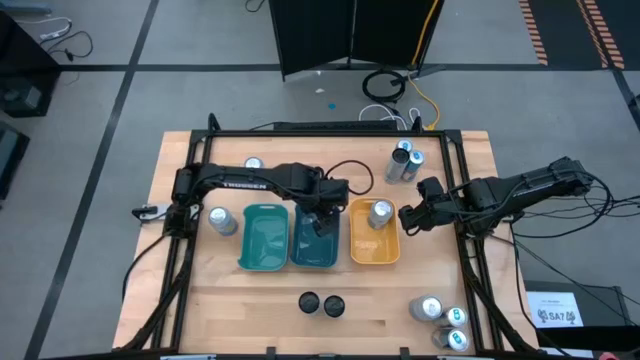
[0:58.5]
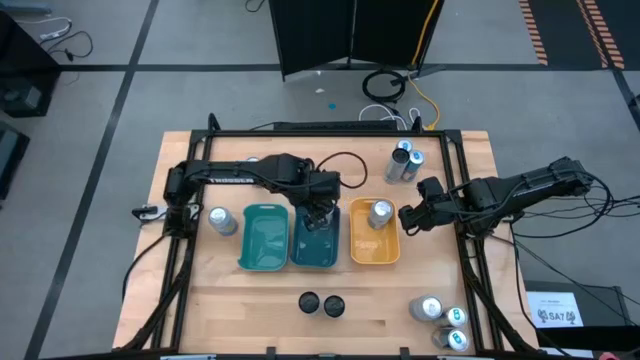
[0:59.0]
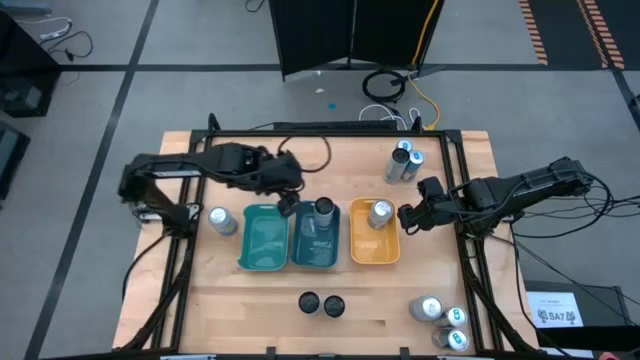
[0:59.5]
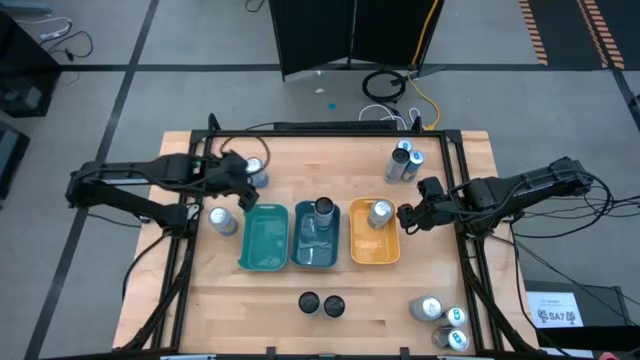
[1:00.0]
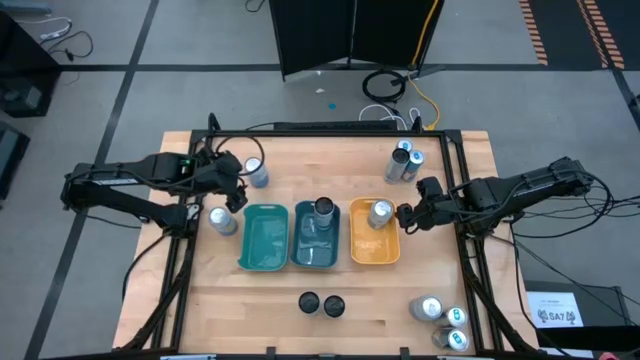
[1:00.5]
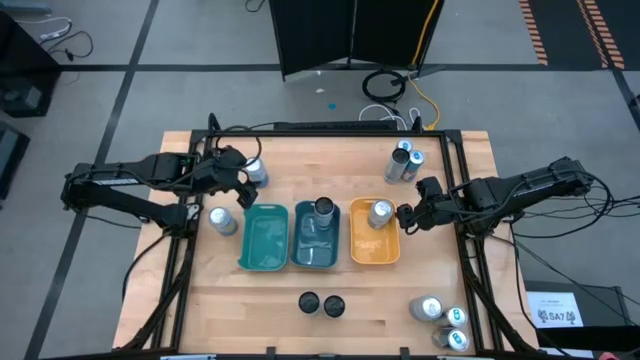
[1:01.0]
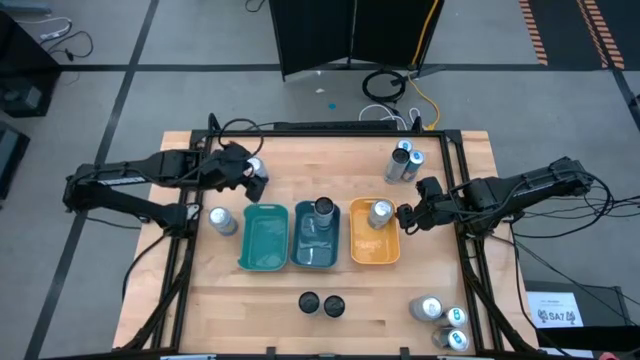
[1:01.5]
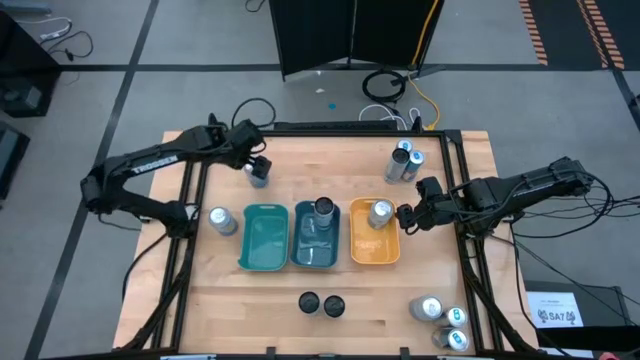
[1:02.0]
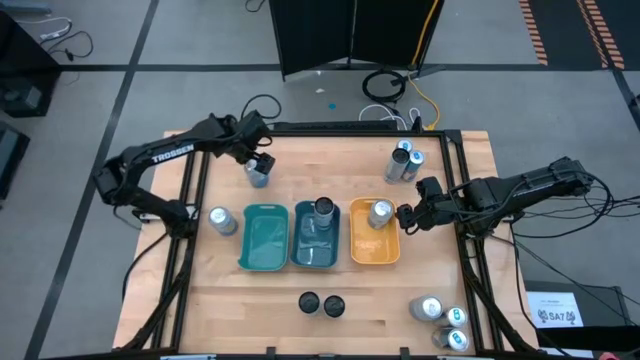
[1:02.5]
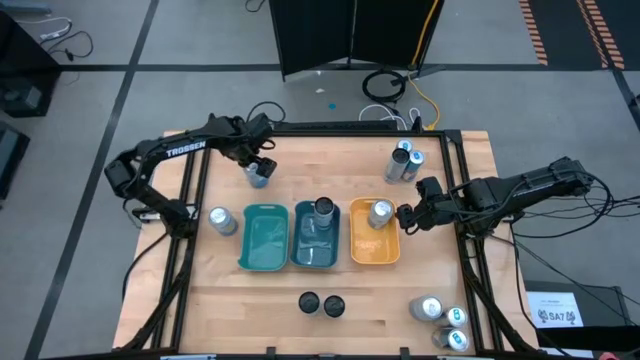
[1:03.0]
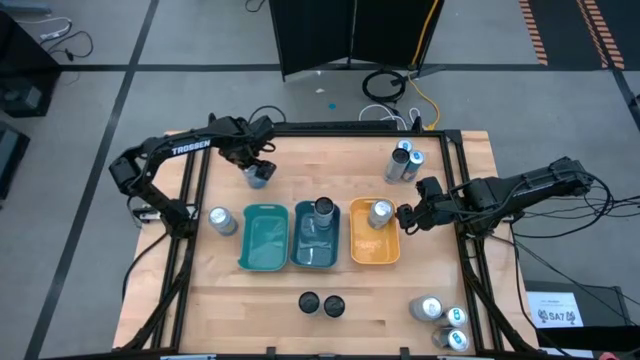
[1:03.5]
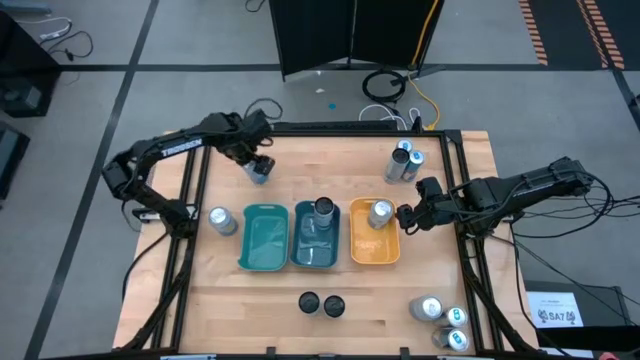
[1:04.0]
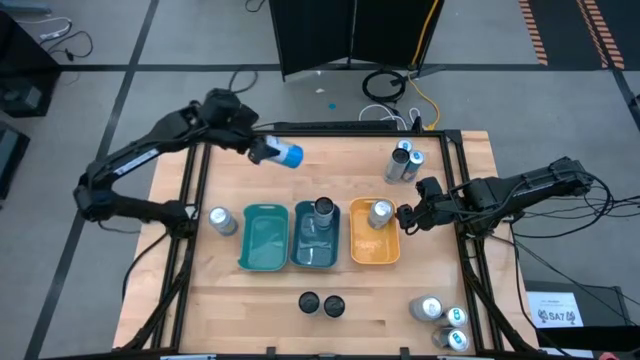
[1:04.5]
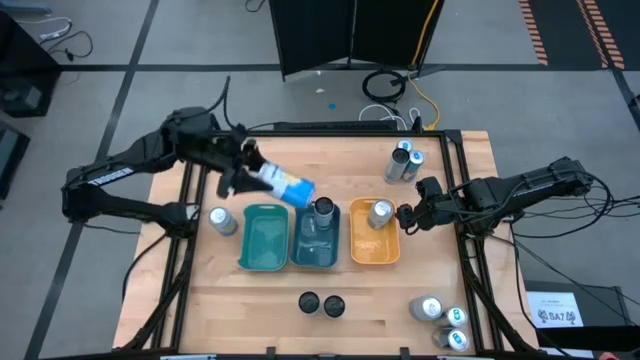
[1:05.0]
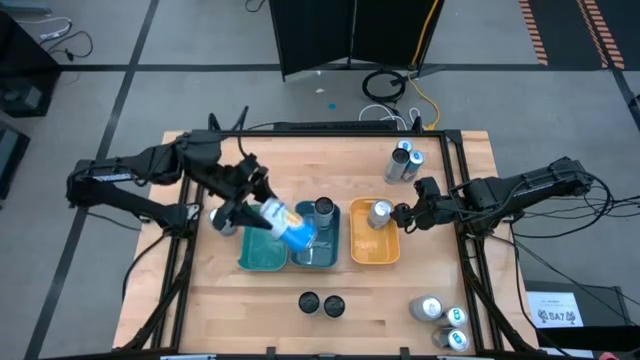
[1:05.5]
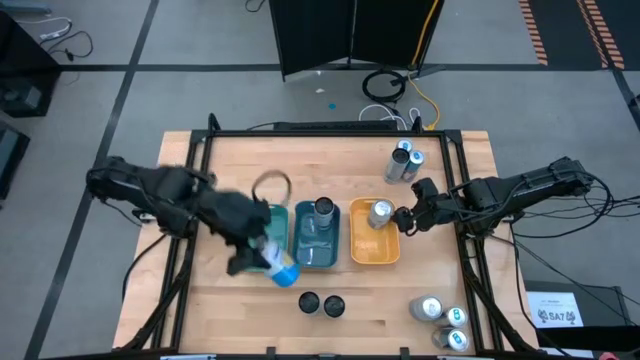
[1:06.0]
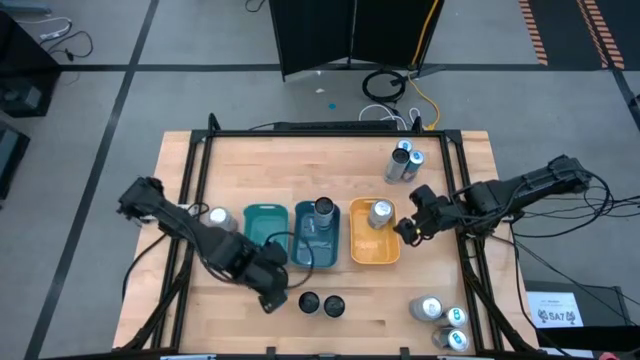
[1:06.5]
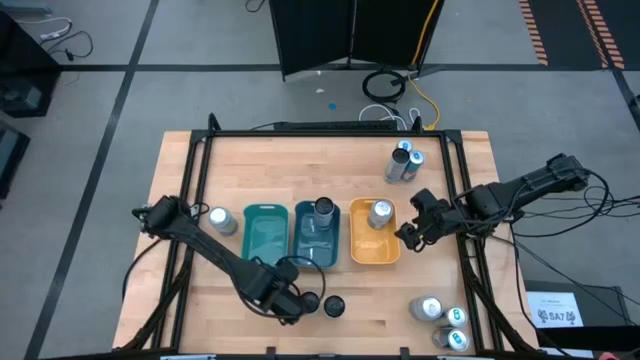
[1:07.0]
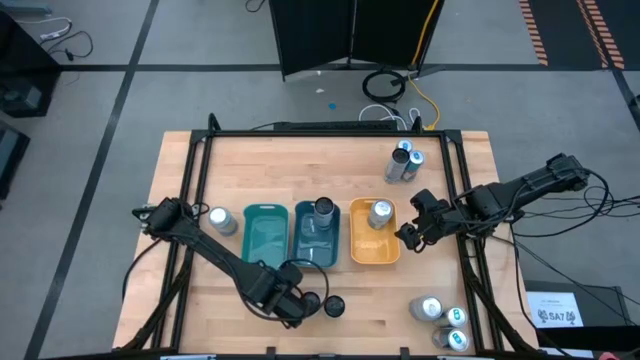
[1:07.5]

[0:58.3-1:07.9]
Task: Sort soda cans
Move the top silver soda can to the bottom center of the table

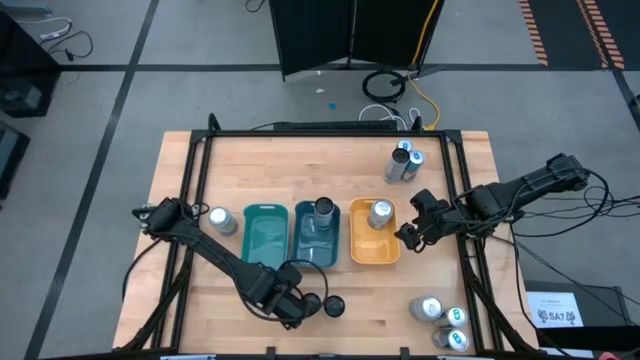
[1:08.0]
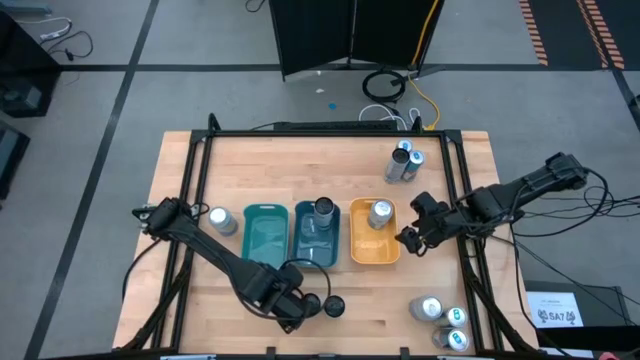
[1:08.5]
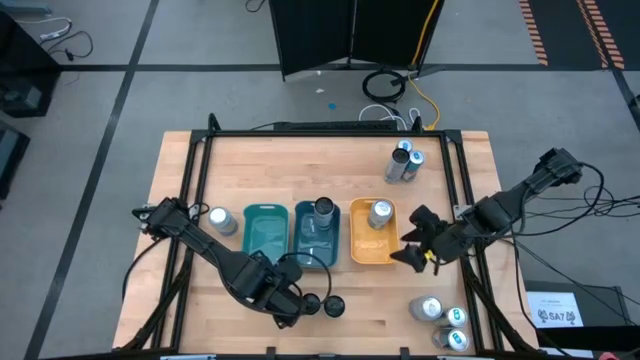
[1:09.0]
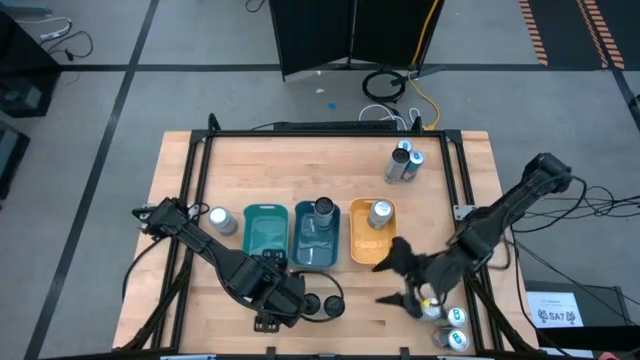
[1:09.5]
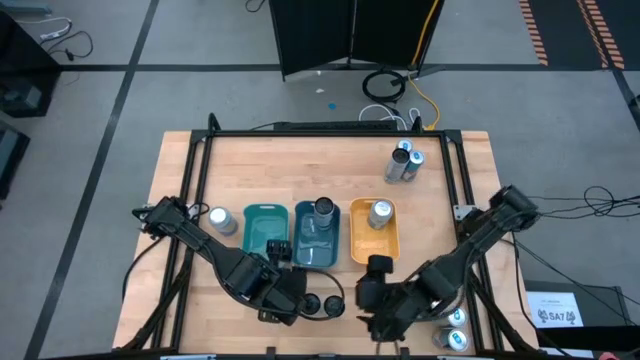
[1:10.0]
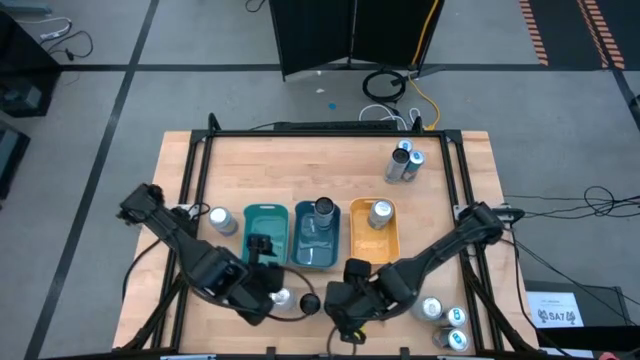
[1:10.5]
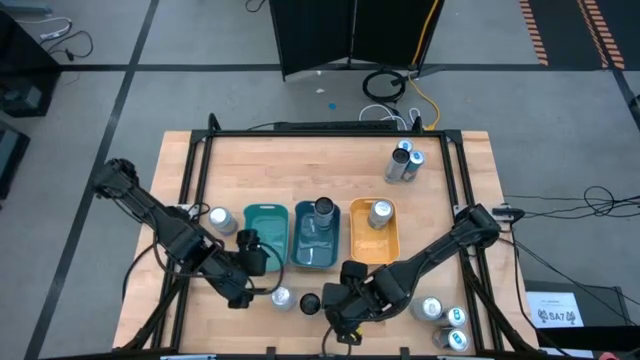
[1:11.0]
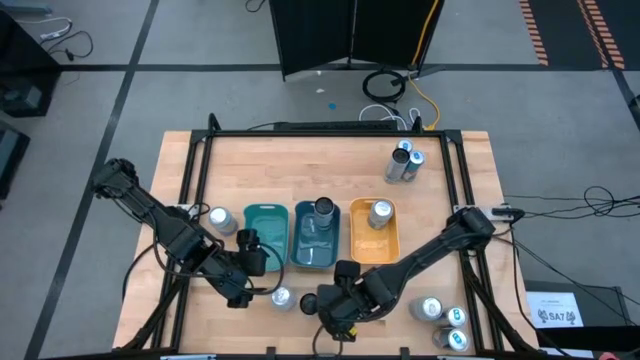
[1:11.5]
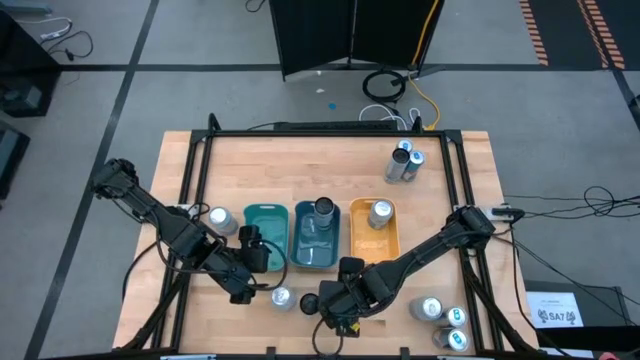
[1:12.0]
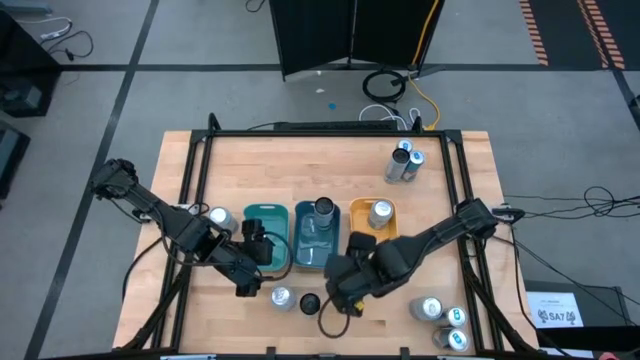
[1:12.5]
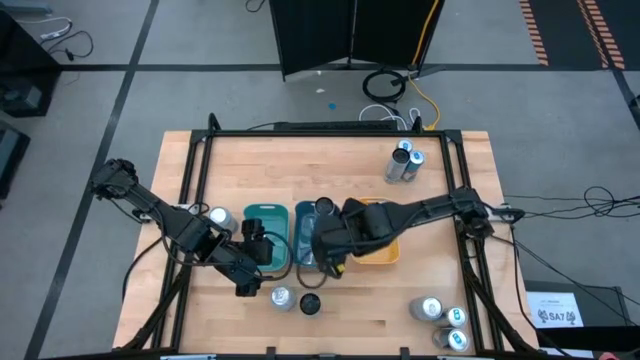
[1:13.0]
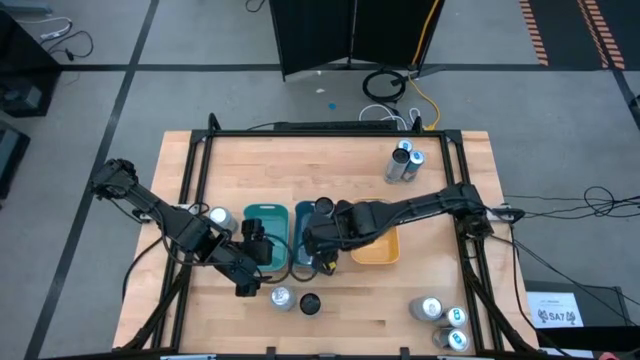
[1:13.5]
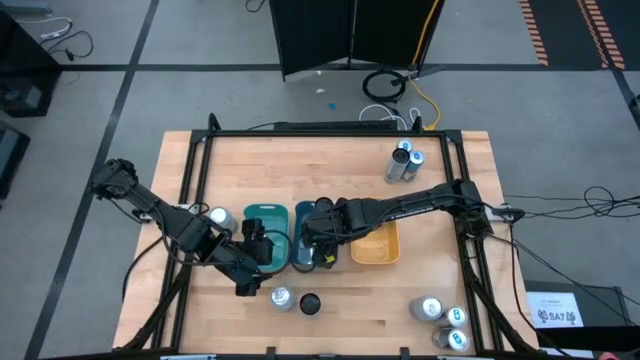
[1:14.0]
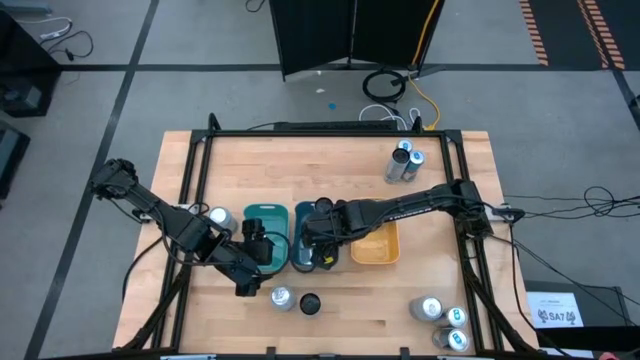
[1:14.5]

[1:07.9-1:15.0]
Put the right black soda can into the blue bin

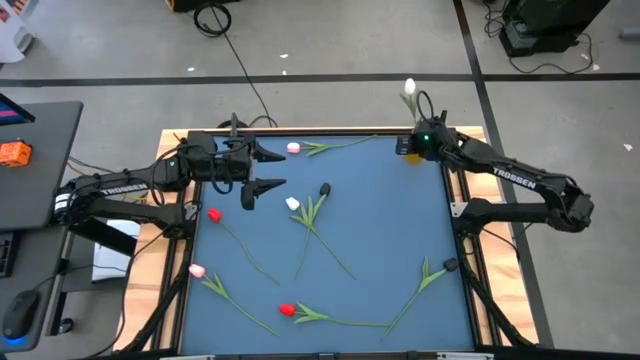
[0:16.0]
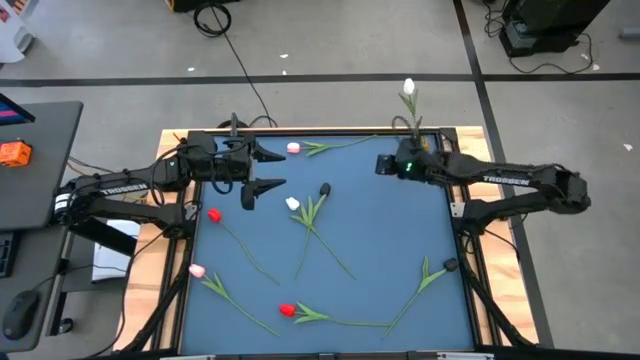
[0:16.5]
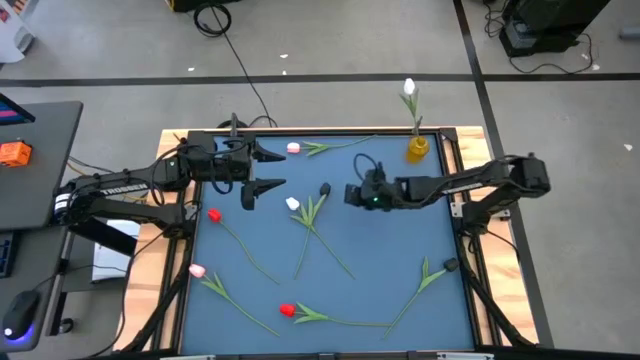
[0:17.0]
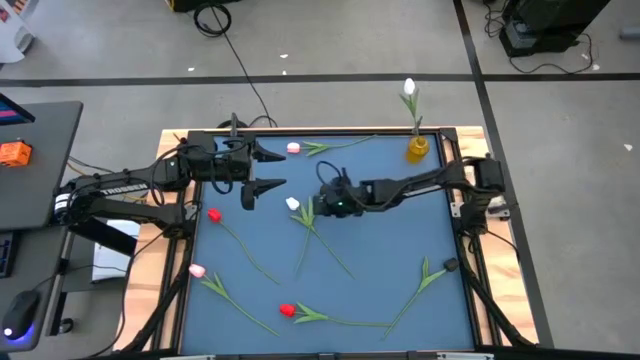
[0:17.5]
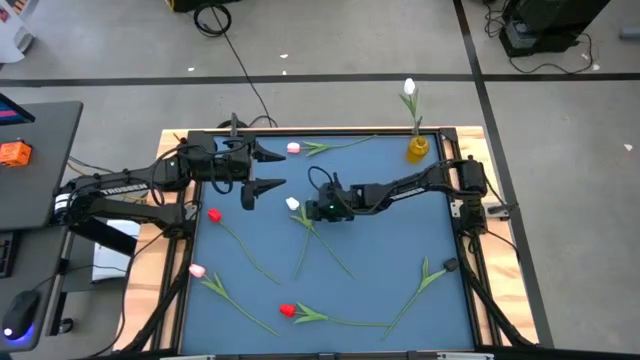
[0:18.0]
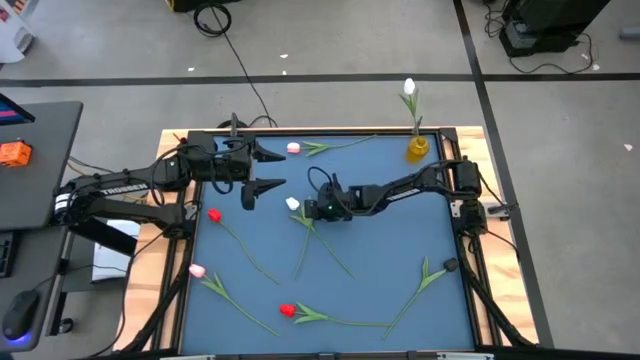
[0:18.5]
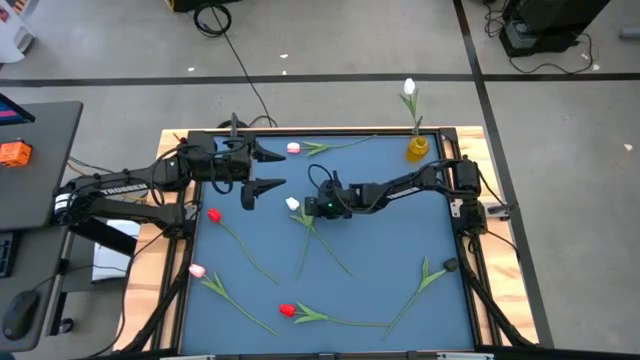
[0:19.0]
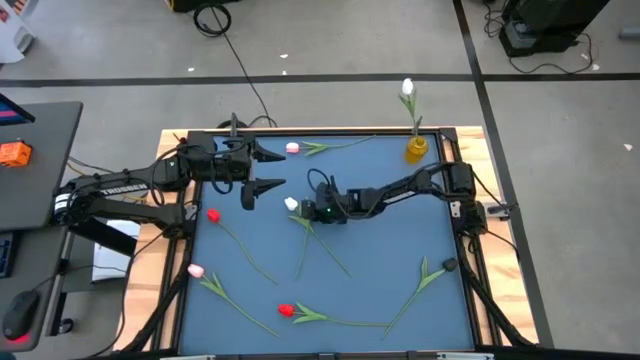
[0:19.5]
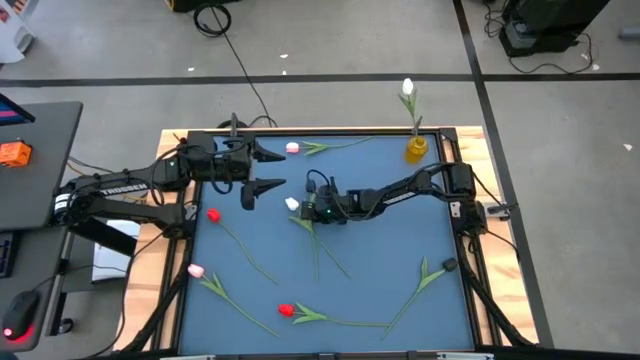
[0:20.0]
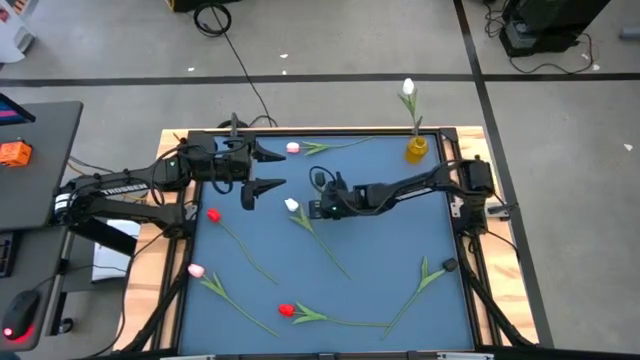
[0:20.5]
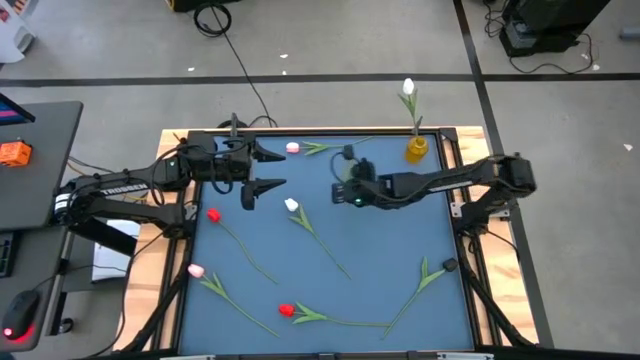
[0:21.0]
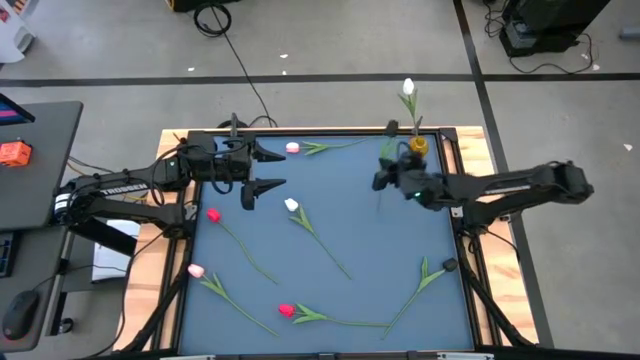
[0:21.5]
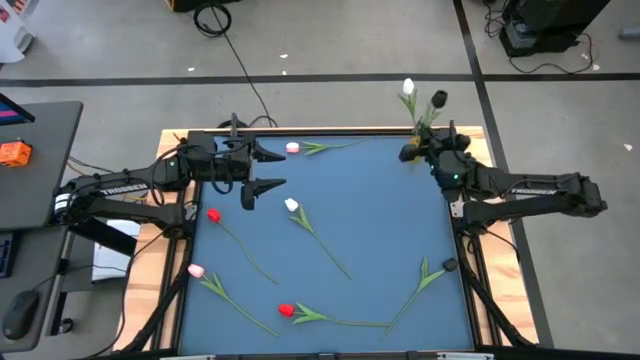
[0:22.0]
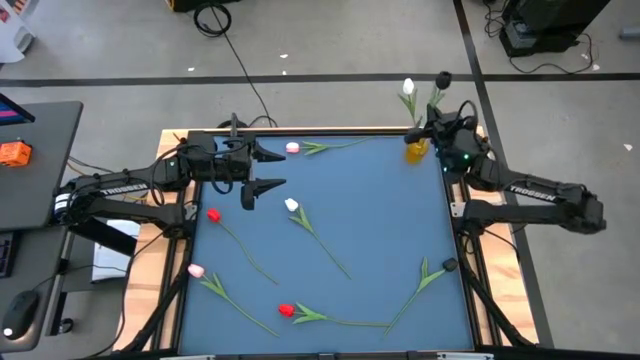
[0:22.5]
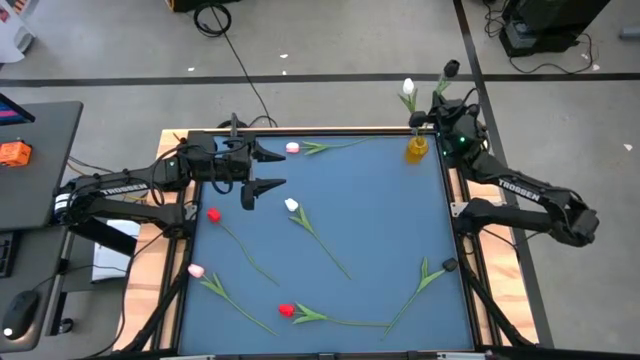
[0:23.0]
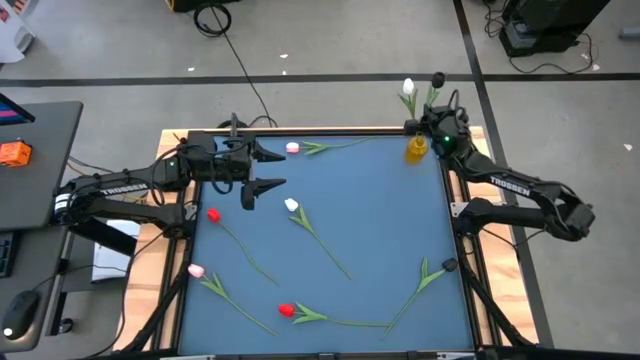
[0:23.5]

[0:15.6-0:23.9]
Task: Sort flowers into vase by color
Put the top black tulip into the yellow vase
